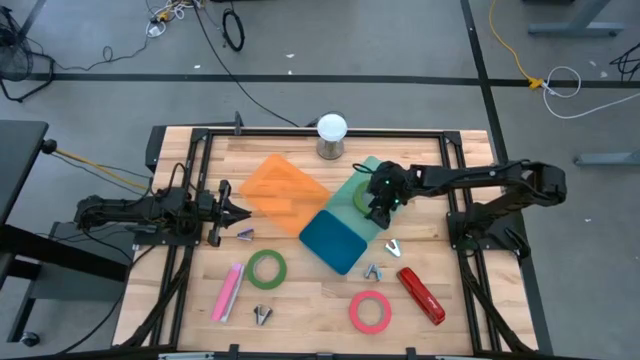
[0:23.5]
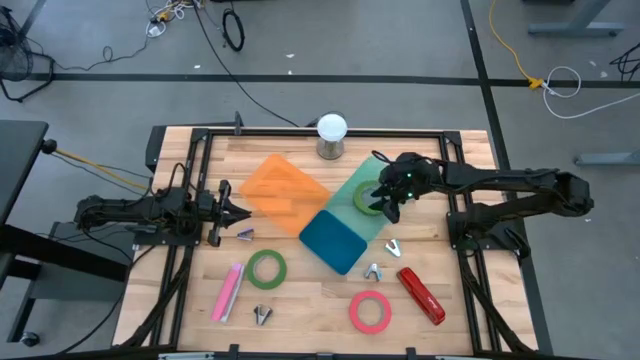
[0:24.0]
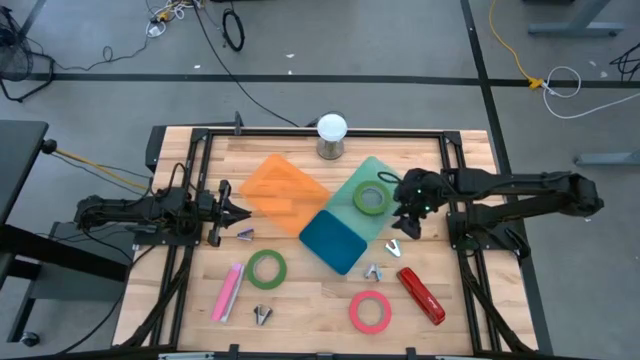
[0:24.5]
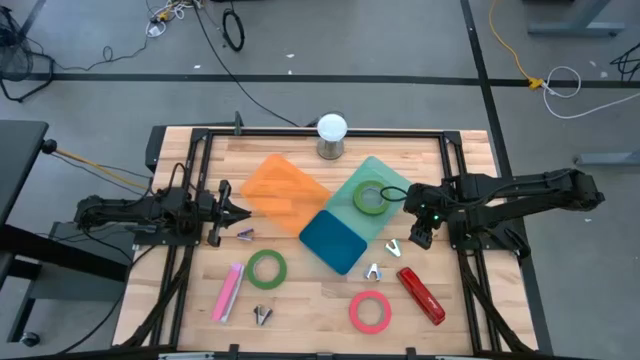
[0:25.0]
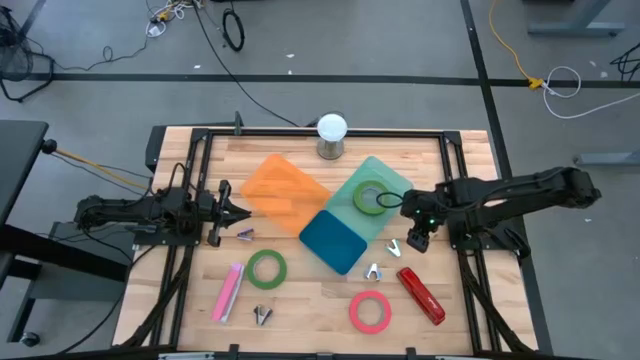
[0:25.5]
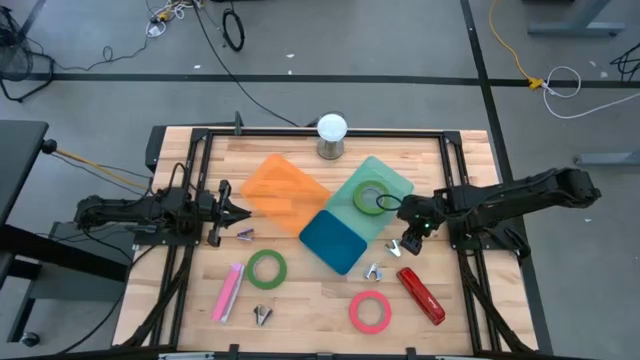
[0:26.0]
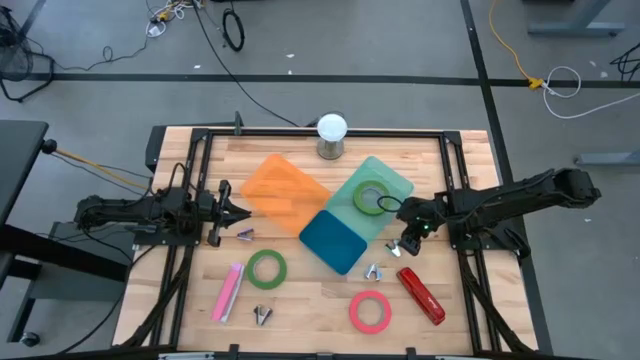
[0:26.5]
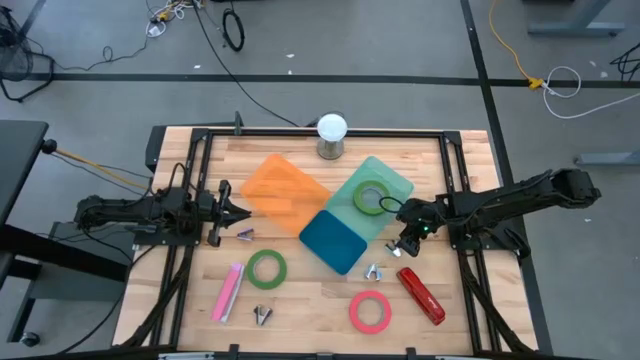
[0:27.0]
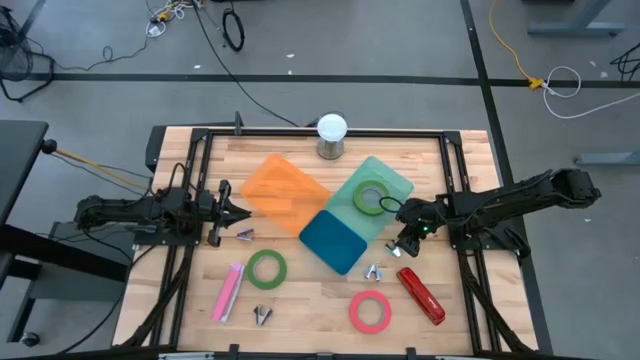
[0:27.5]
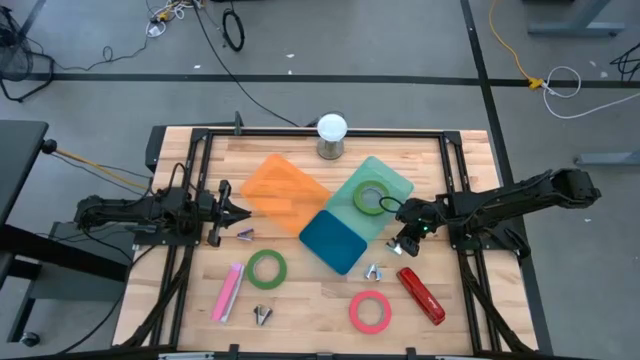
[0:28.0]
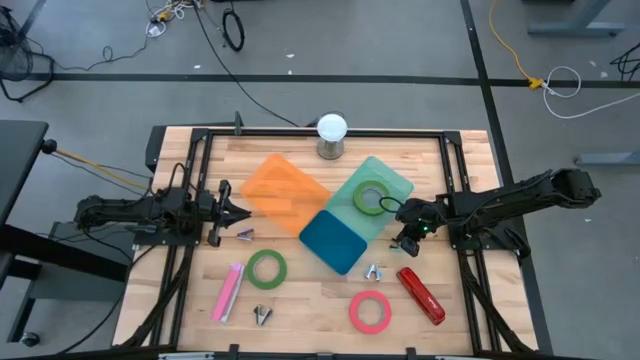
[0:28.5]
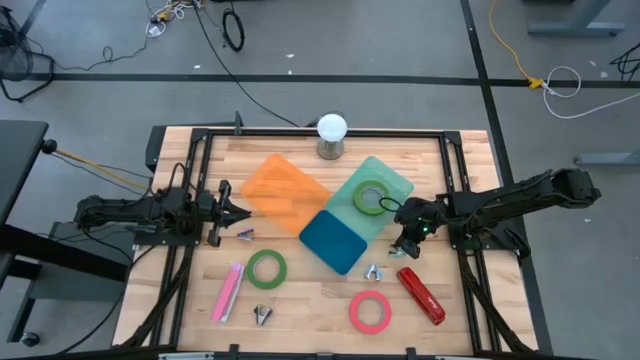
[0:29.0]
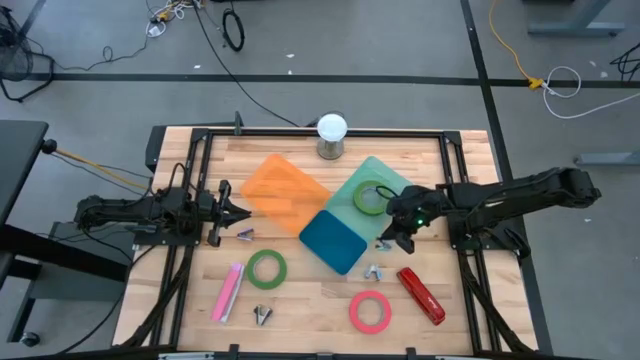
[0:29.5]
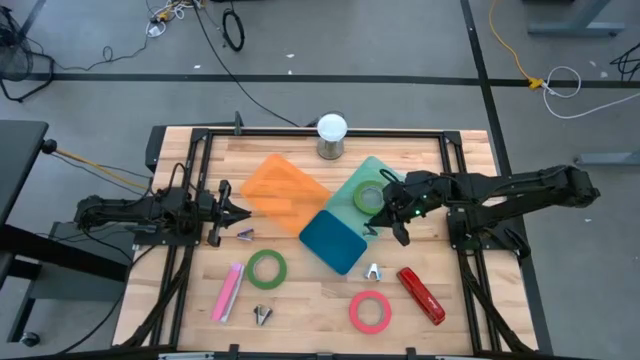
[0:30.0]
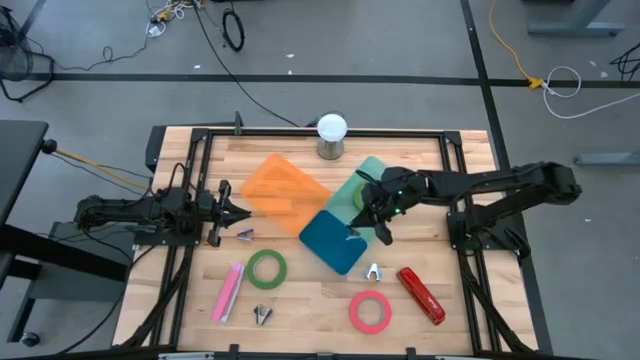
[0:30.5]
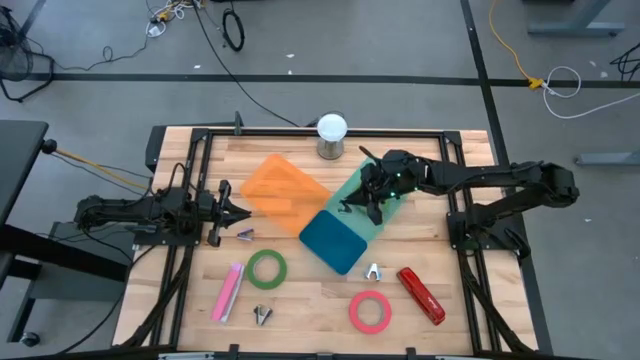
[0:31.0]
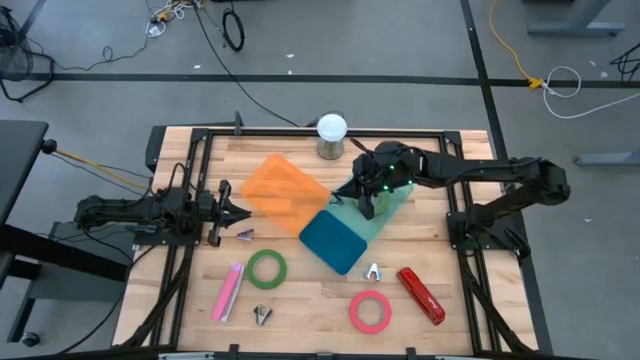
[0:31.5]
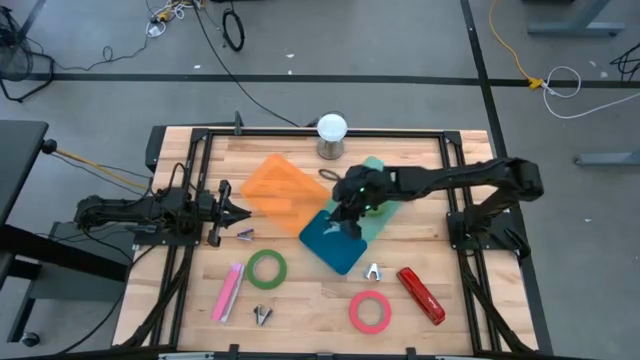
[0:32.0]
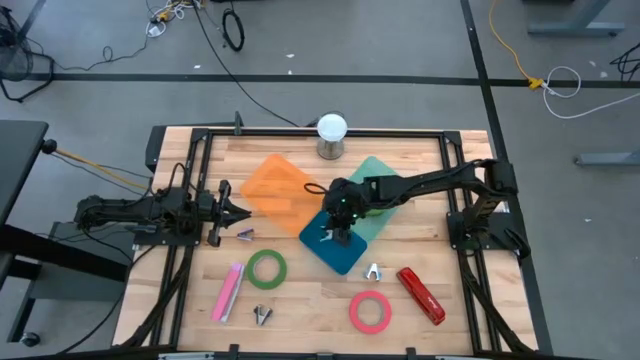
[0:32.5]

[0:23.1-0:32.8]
Task: Pick and place Stapler, Stapler remover, tape
Put the light blue staple remover into the blue bin

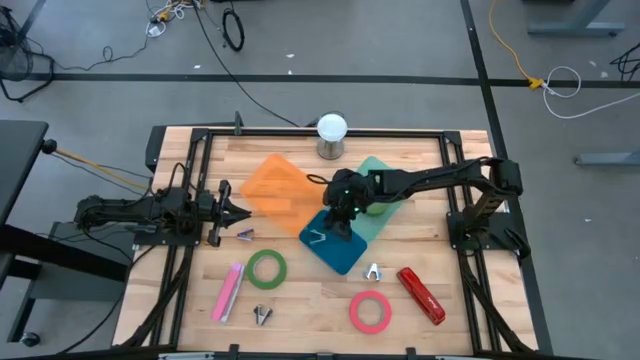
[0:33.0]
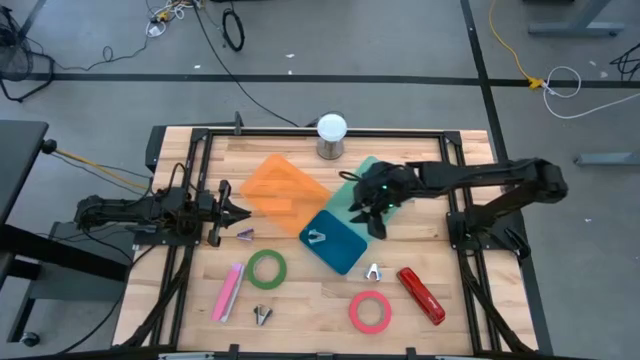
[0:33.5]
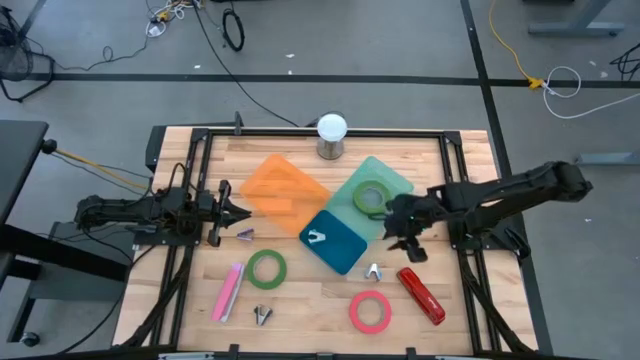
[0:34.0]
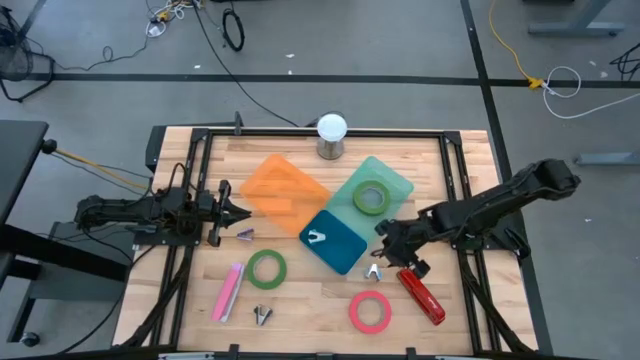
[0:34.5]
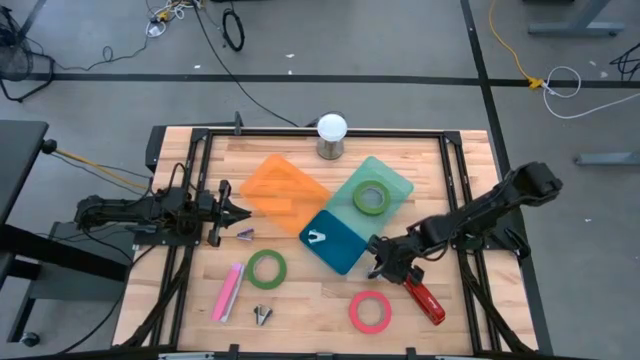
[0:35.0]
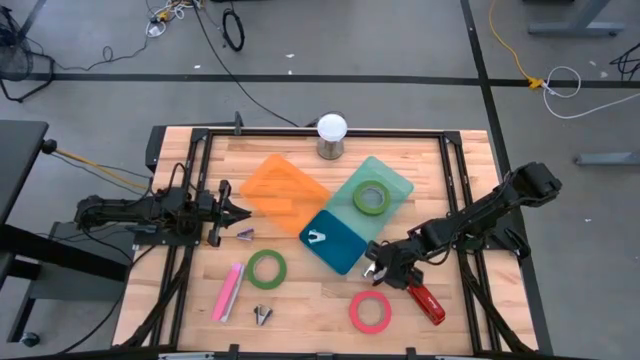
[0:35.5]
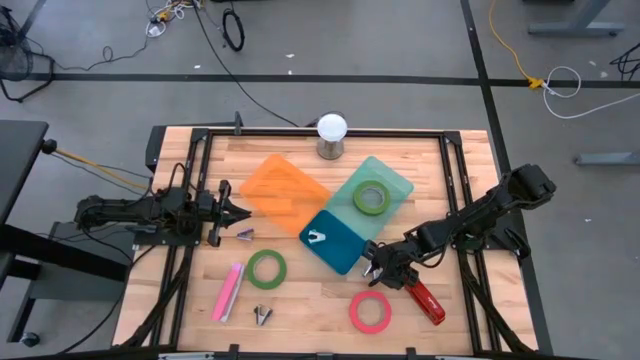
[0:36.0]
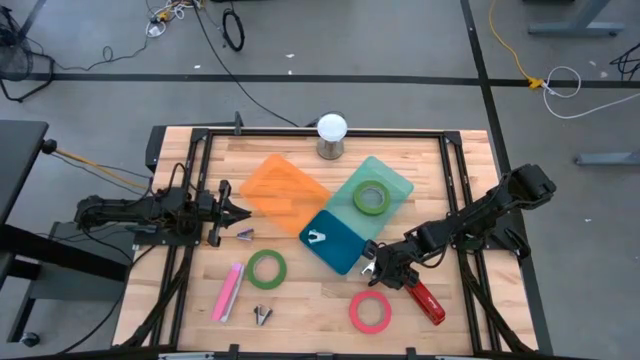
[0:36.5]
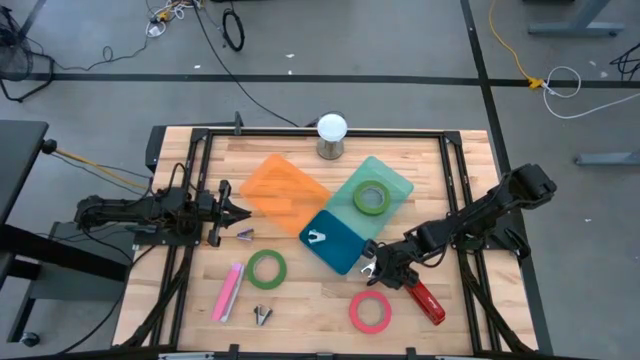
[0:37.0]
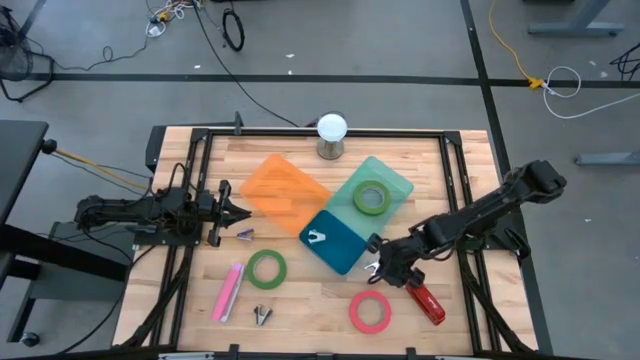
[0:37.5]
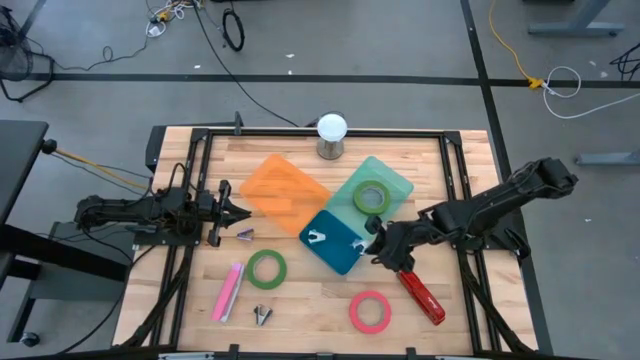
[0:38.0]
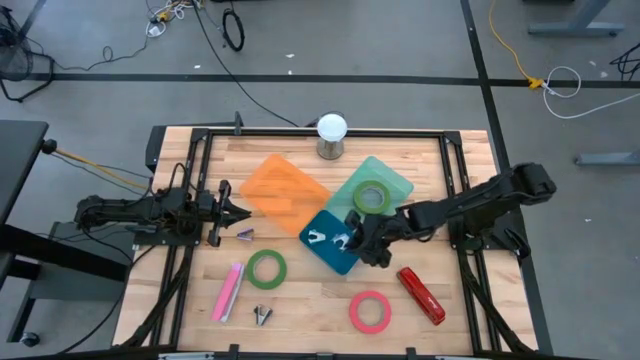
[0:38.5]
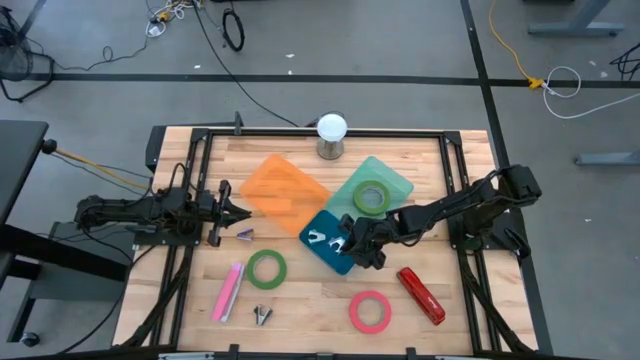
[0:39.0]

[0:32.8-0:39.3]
Put the blue staple remover into the blue bin

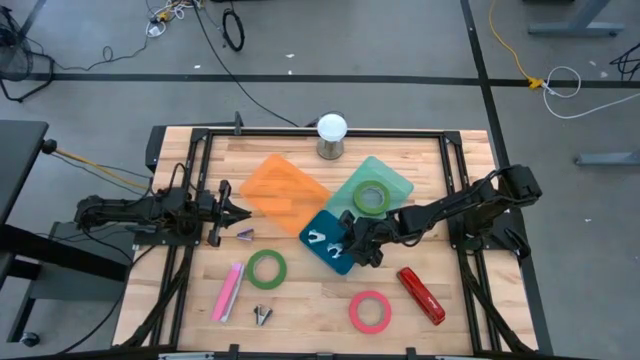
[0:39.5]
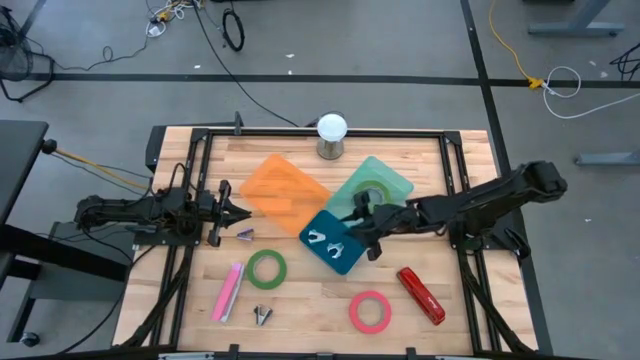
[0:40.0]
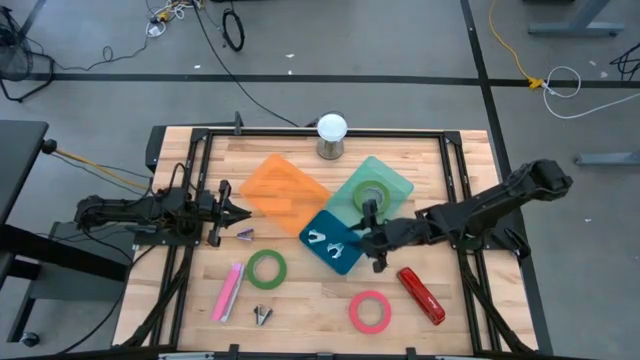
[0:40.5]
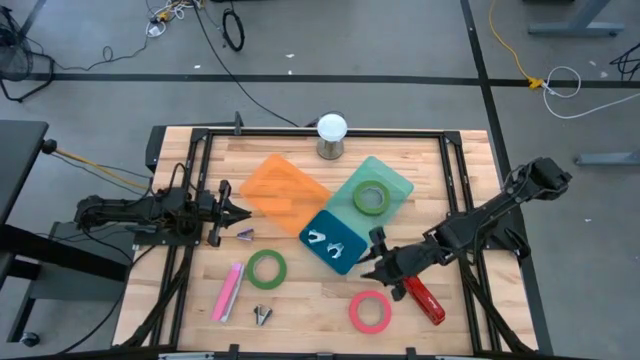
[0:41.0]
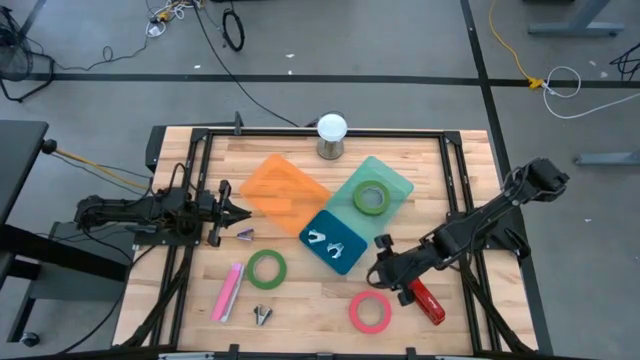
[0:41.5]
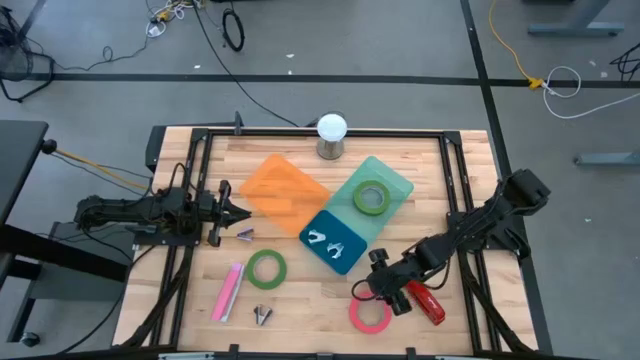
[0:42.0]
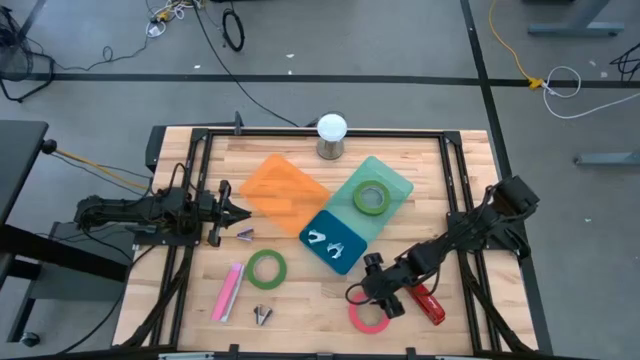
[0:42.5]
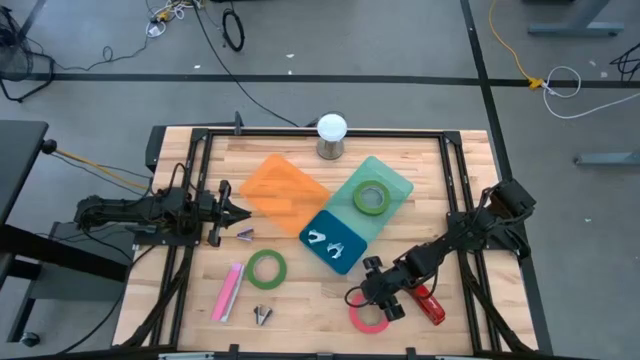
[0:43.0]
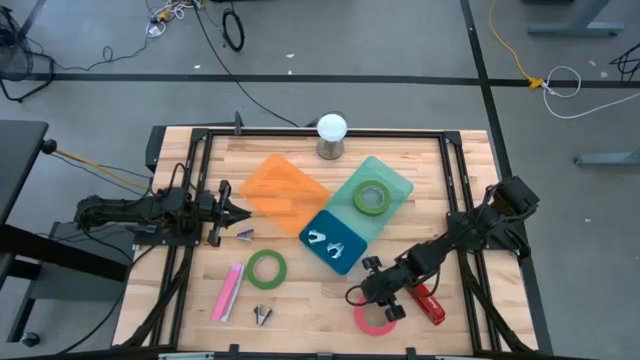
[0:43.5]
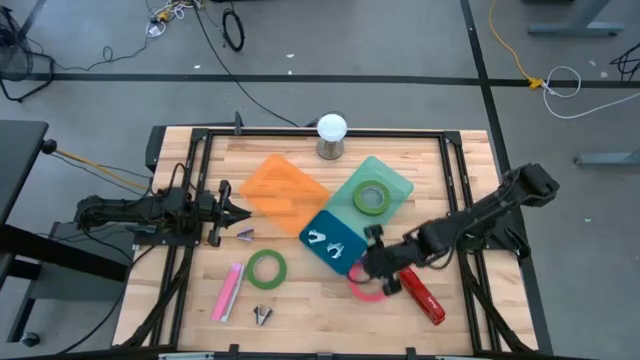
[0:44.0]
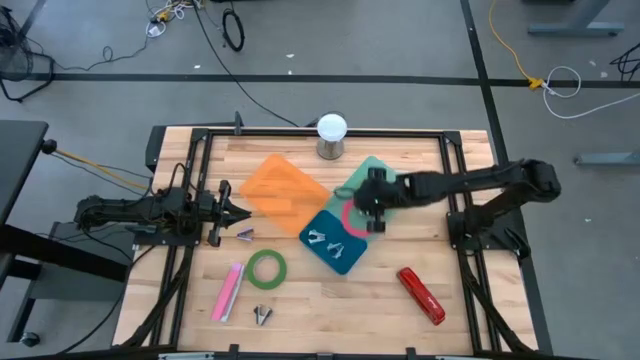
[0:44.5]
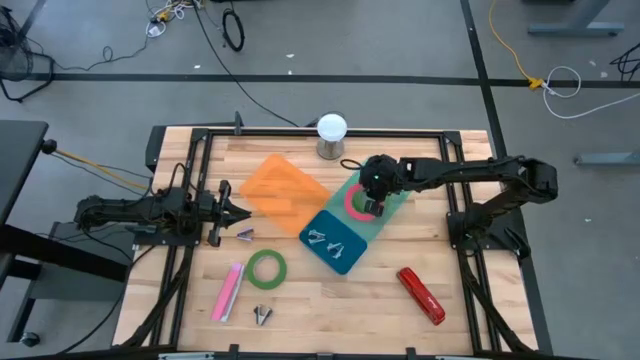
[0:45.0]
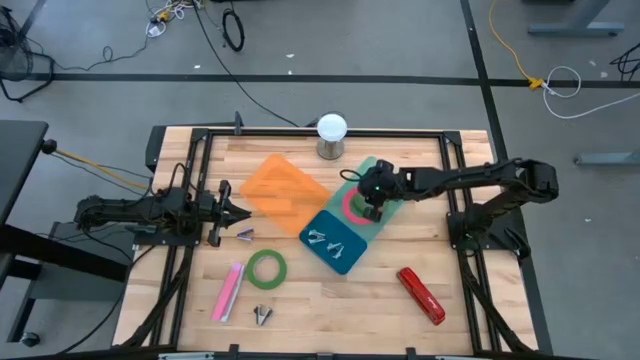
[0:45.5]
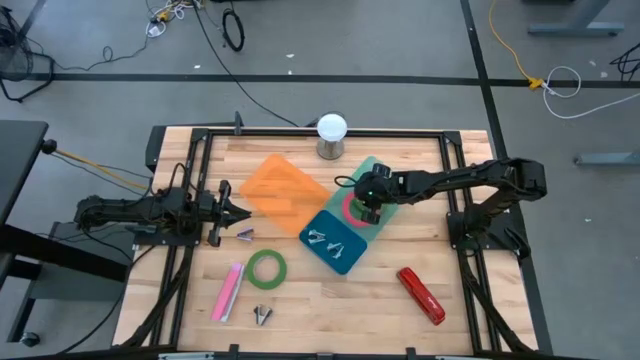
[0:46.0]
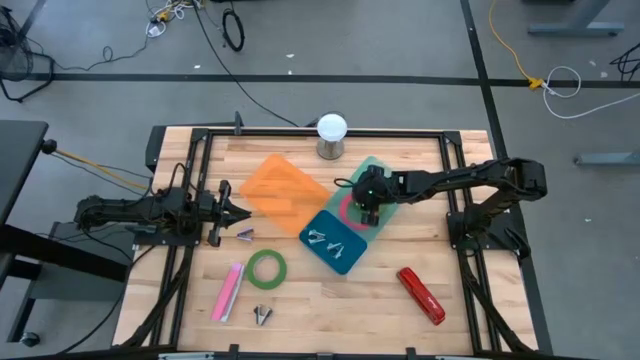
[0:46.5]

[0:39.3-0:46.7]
Put the pink tape into the green bin
